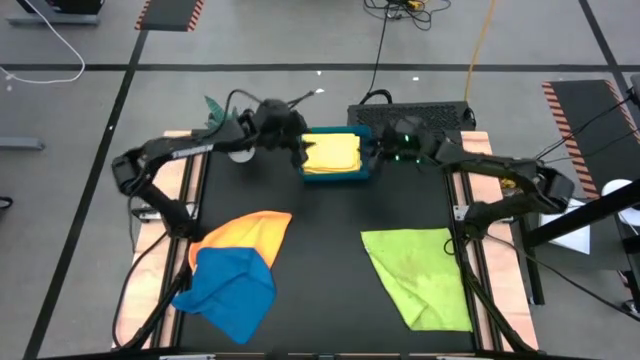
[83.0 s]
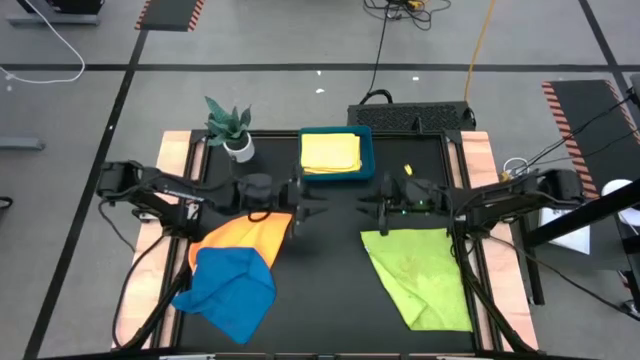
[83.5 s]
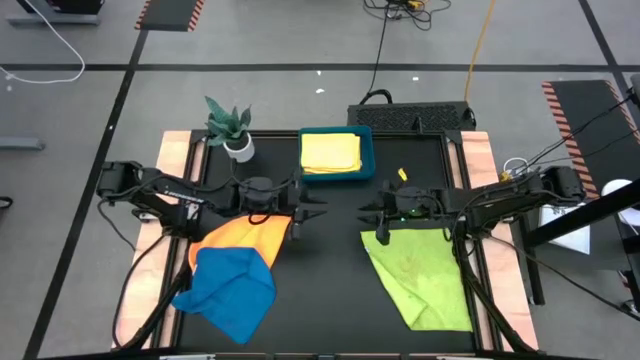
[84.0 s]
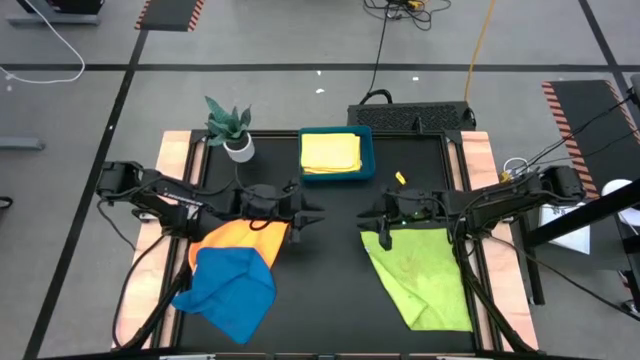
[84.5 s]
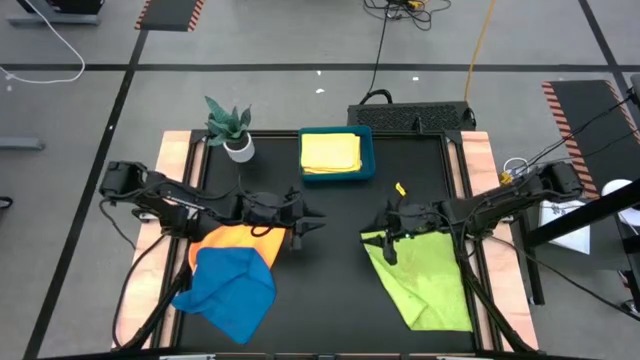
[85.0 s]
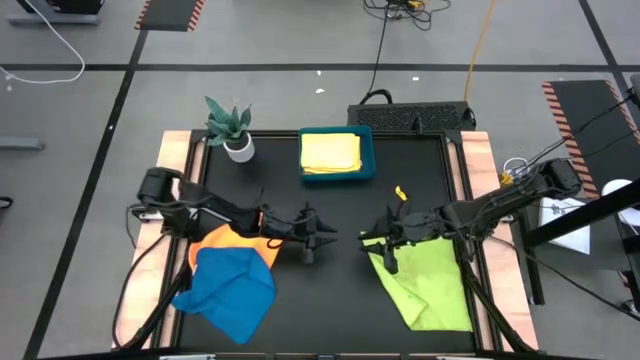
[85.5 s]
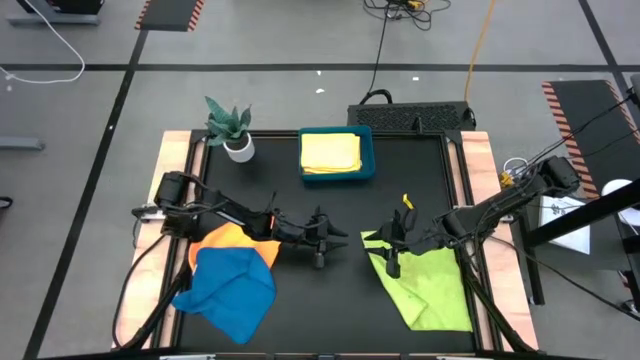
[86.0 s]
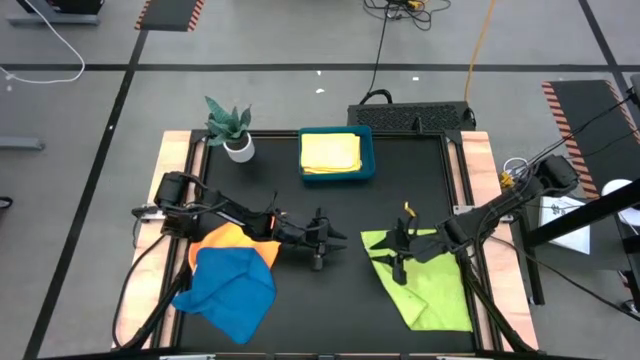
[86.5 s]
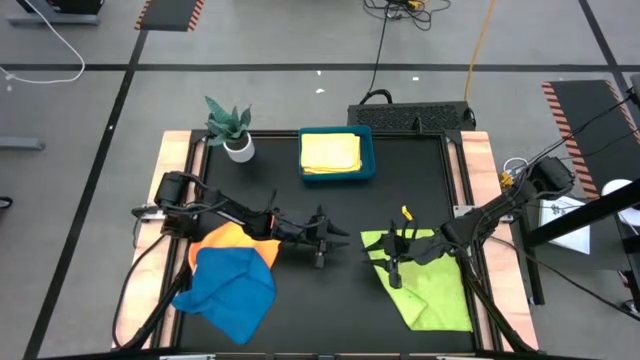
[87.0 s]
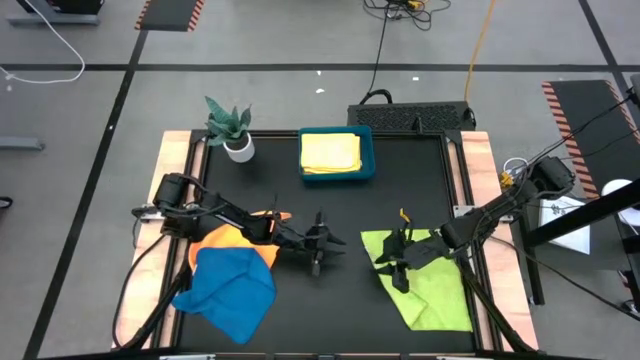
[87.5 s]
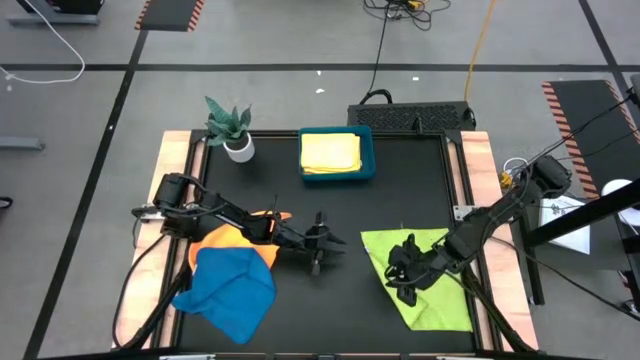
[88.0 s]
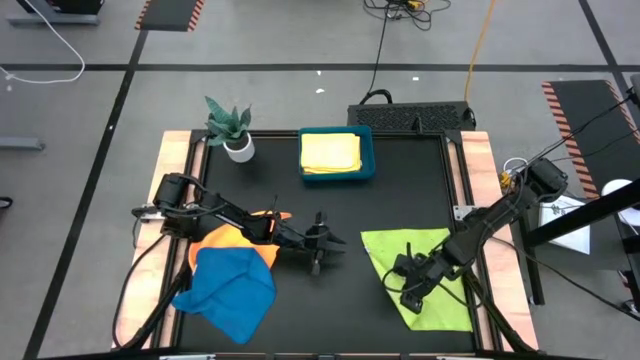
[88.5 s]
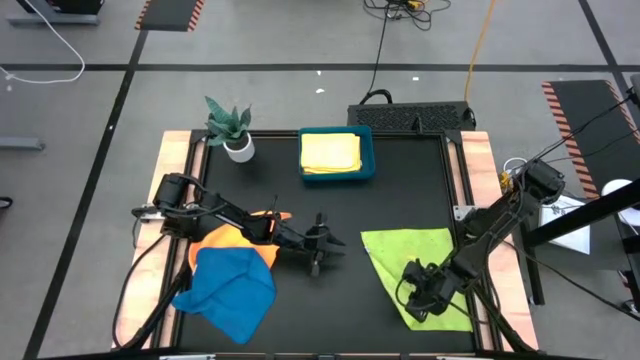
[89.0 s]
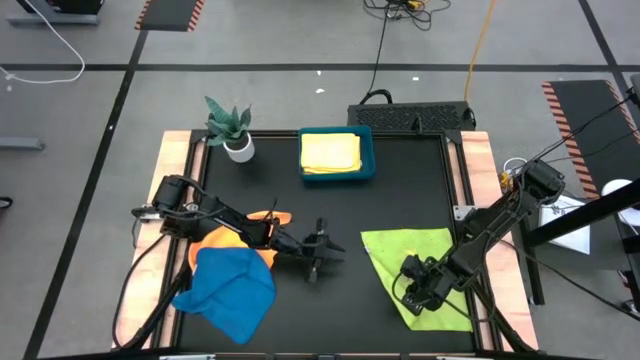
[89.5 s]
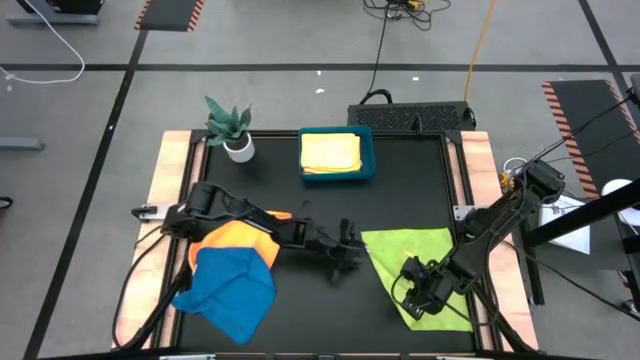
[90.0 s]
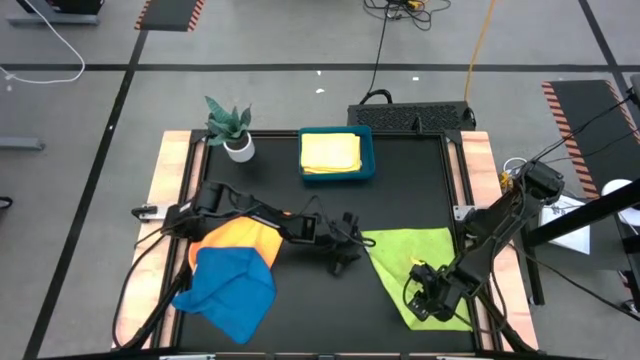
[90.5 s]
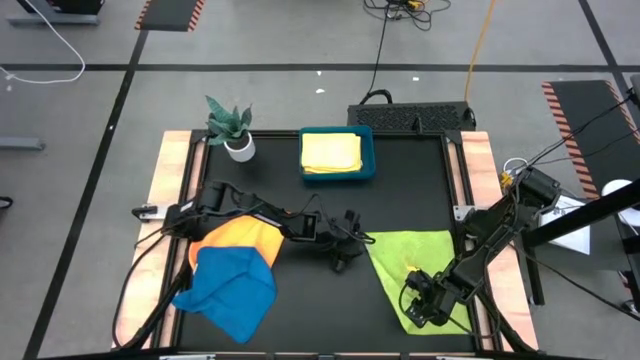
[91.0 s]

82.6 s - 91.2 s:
Task: Fold microfiber towels
Fold the green microfiber cloth

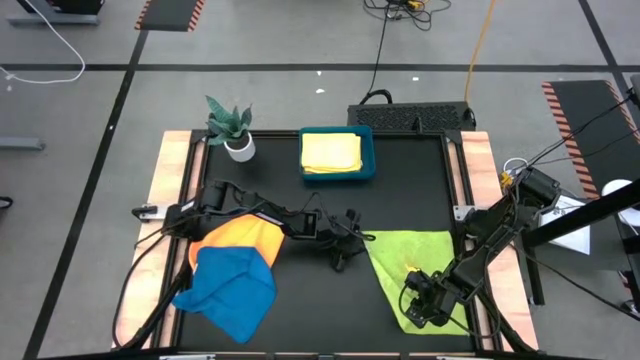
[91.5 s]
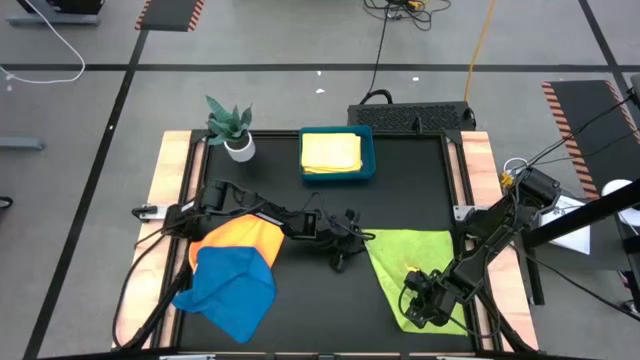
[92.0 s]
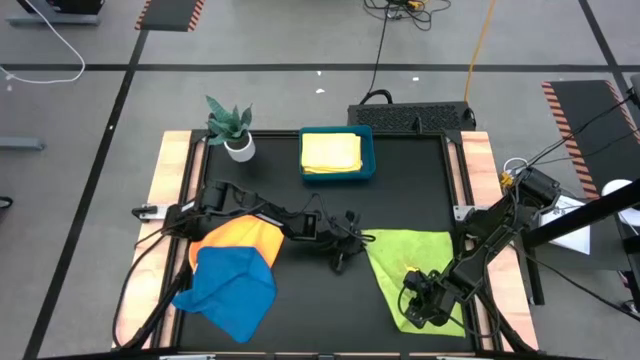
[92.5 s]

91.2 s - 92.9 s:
Fold the green microfiber cloth

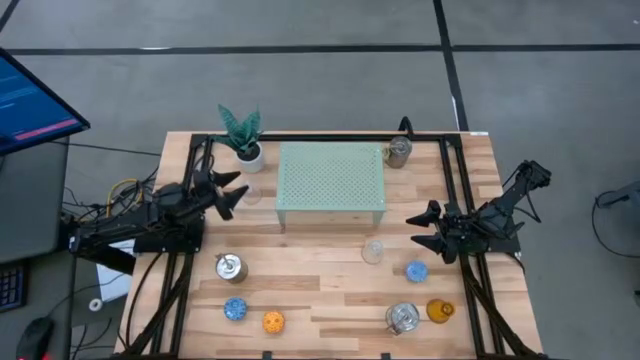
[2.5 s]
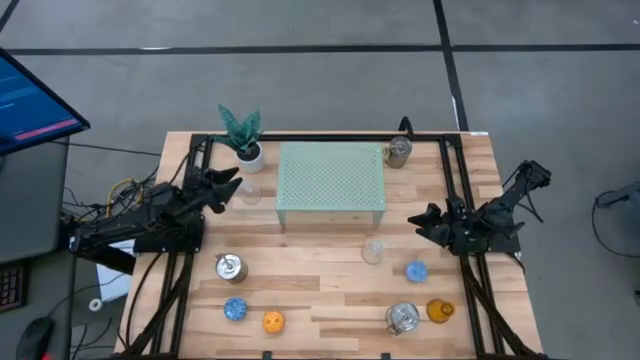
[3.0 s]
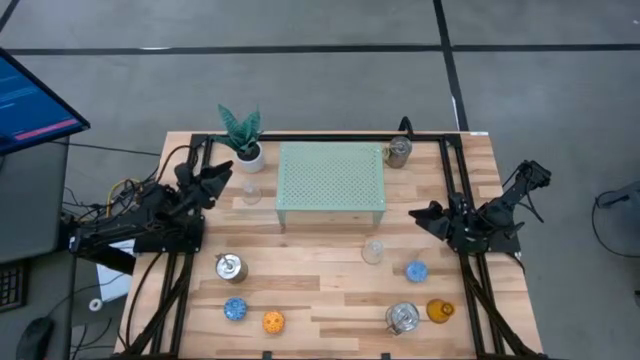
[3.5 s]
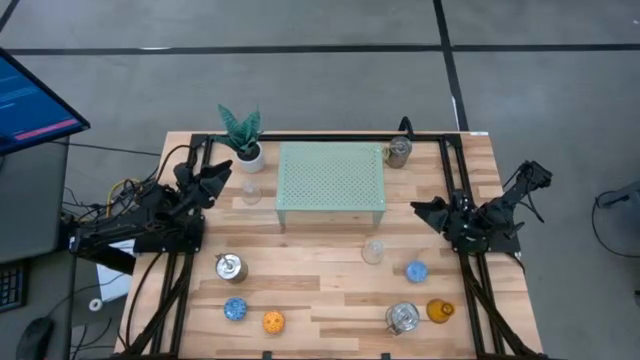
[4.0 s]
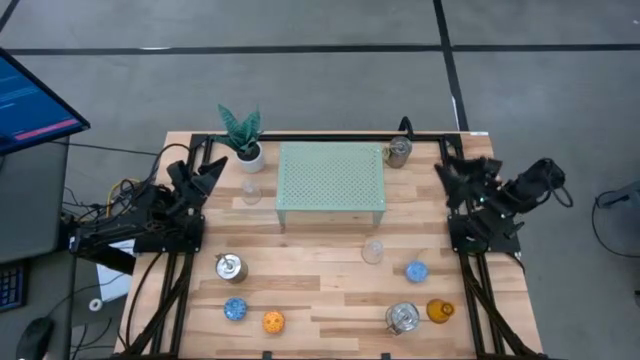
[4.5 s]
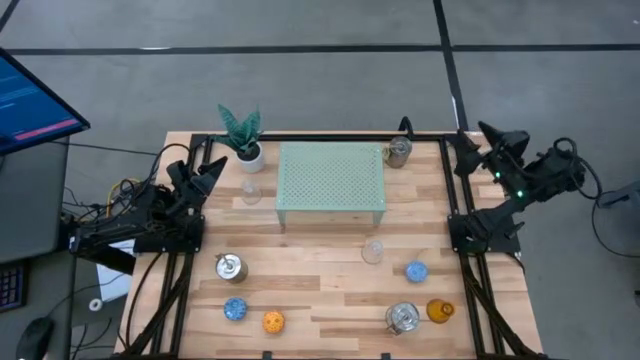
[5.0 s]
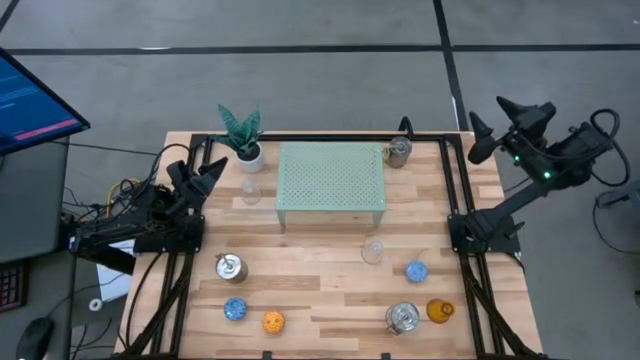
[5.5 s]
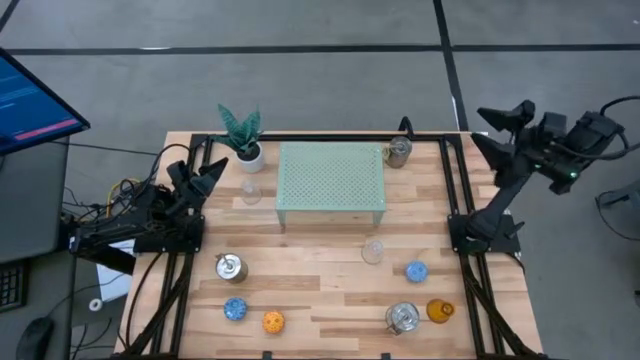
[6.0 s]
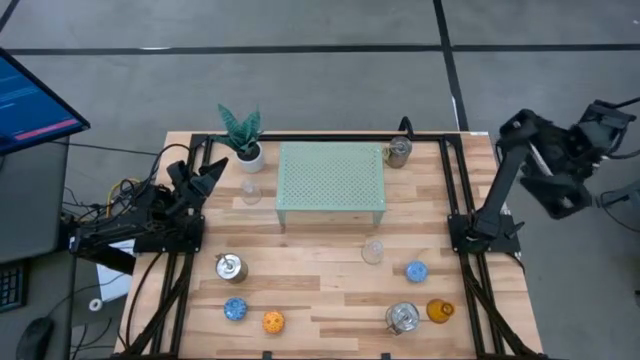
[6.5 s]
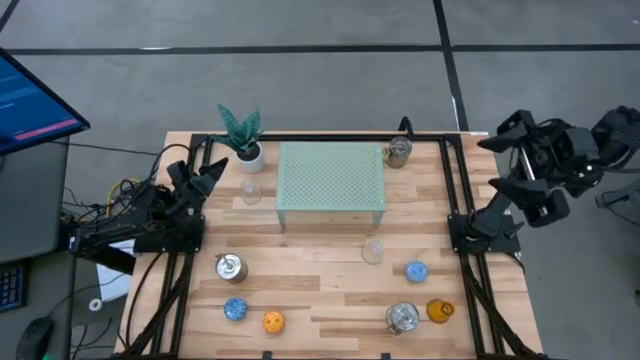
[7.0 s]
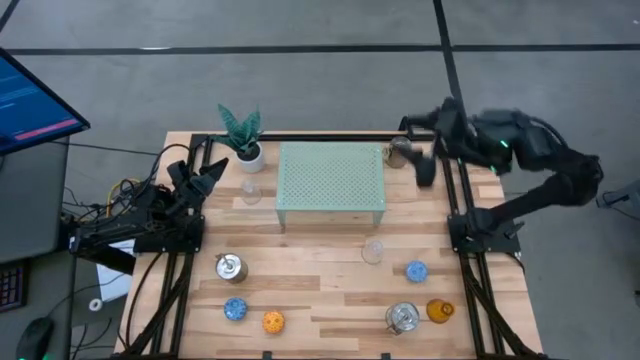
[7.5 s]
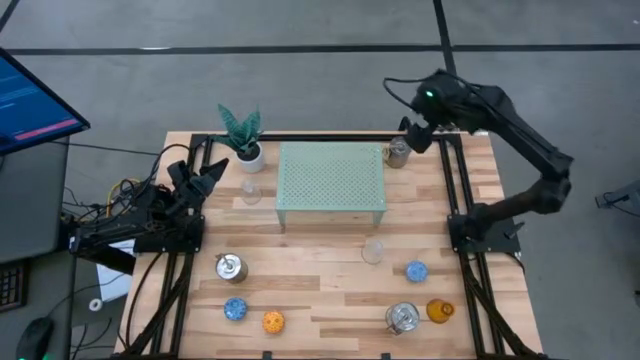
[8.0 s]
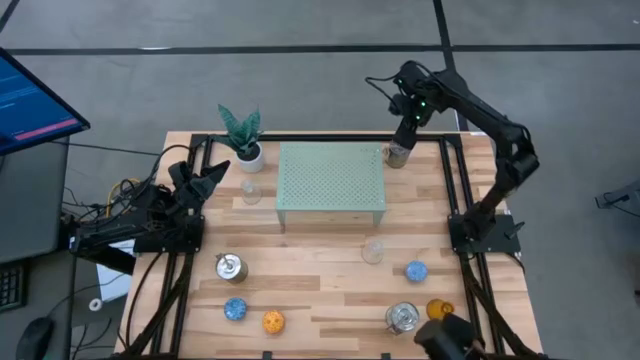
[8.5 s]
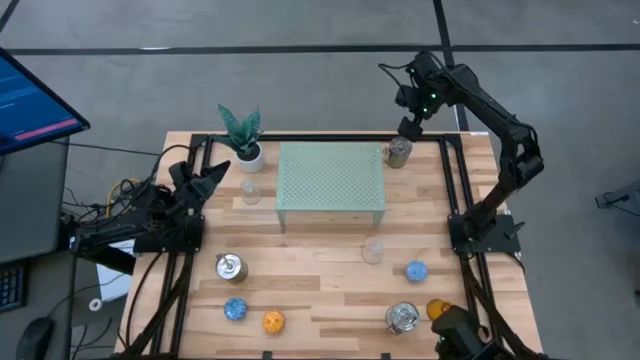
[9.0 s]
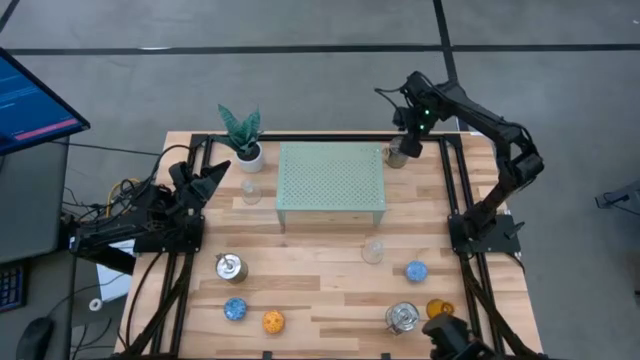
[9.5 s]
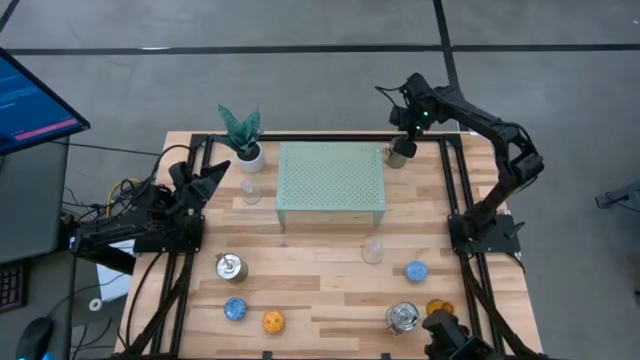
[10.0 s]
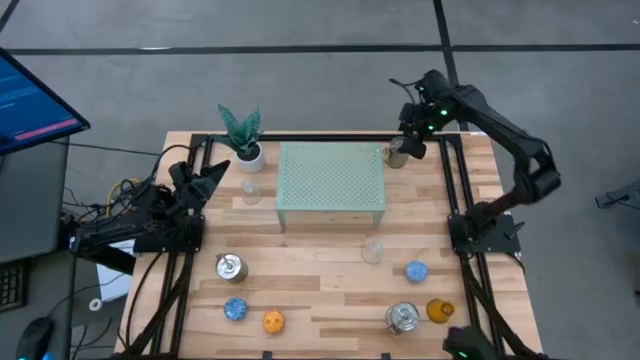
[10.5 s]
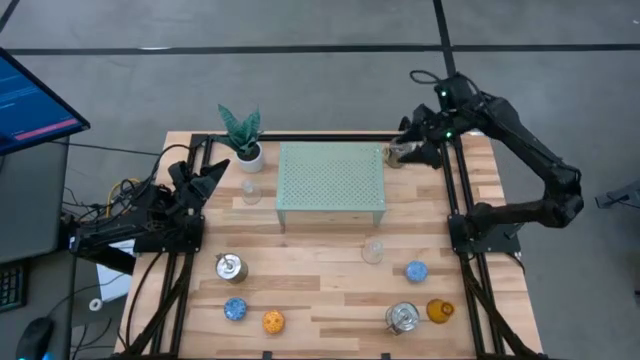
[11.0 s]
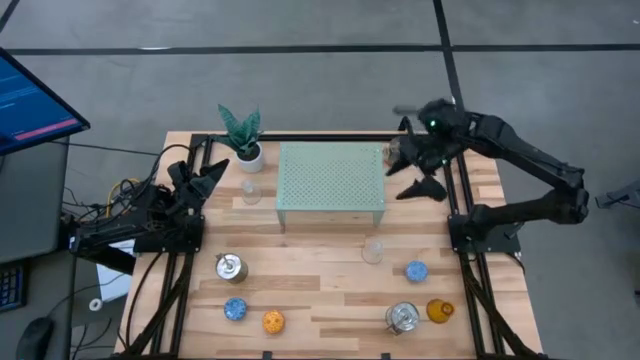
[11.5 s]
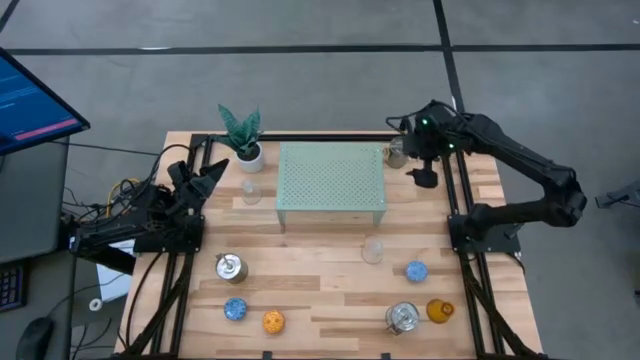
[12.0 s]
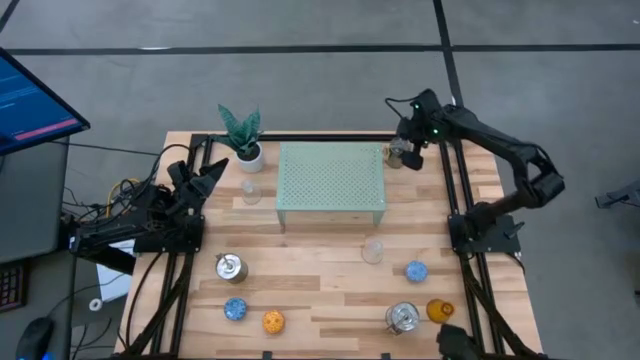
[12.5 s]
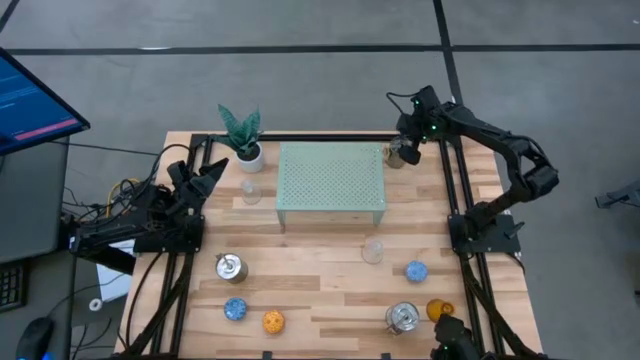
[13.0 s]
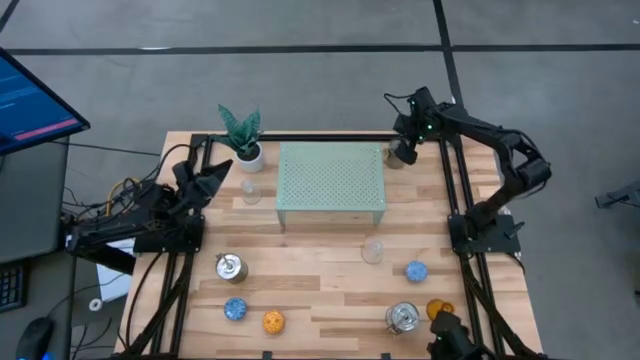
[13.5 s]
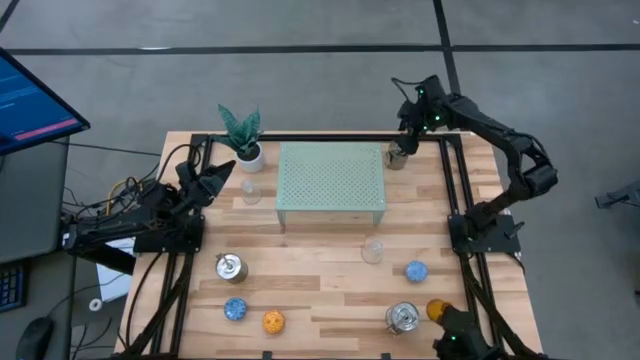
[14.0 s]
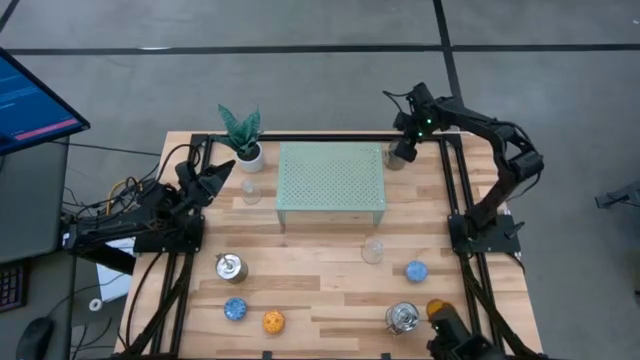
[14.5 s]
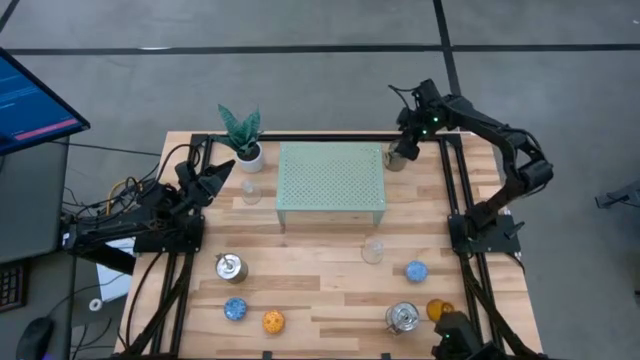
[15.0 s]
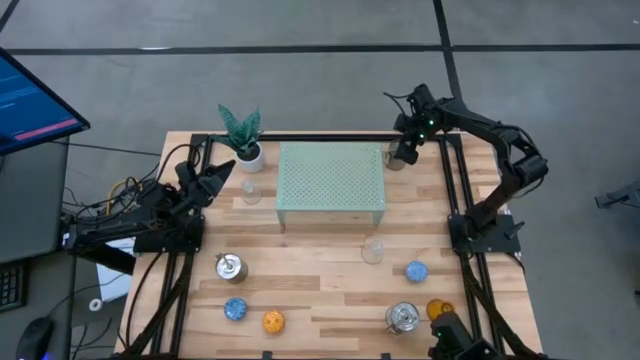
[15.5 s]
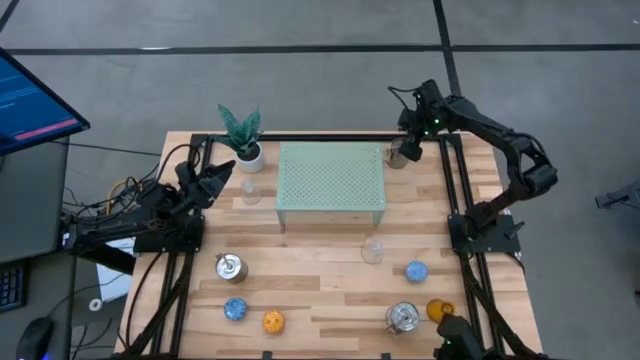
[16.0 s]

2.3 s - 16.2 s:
Task: Pick & Place candle stick holders
Put the top silver scented candle on the shelf
